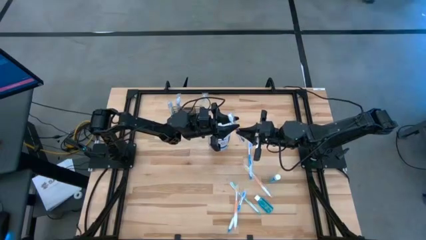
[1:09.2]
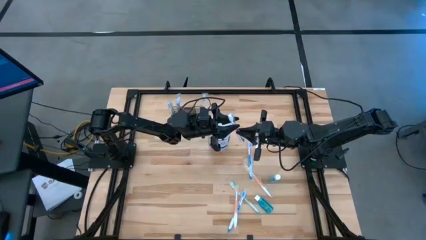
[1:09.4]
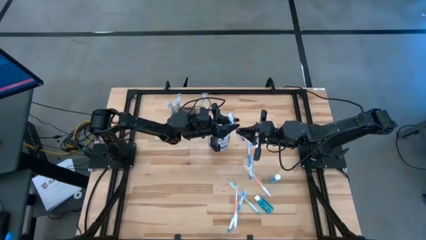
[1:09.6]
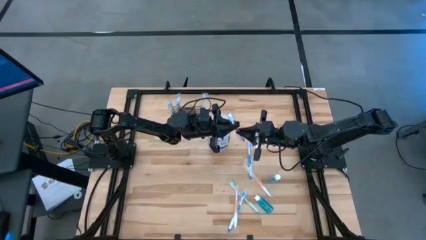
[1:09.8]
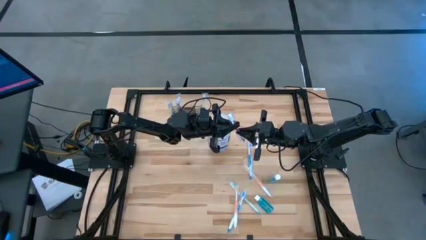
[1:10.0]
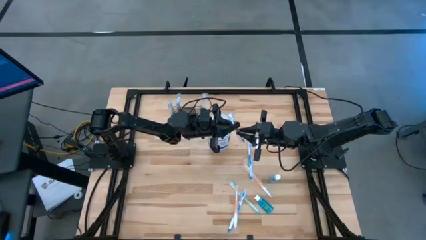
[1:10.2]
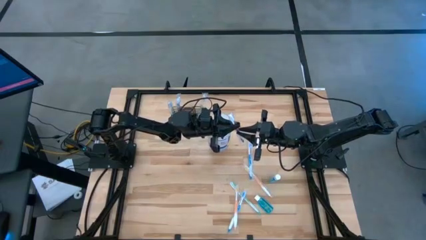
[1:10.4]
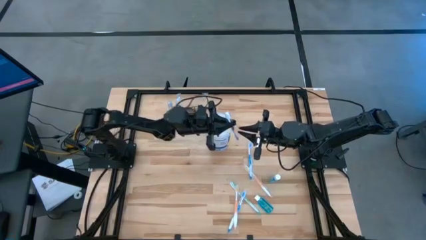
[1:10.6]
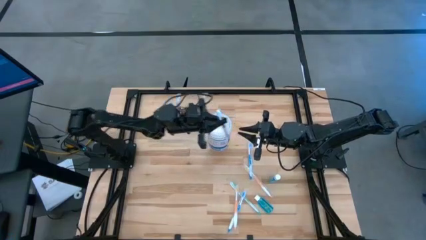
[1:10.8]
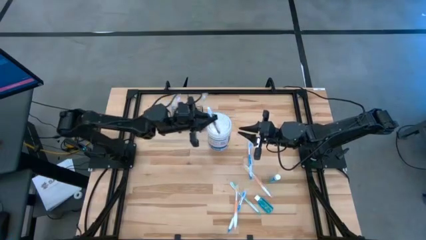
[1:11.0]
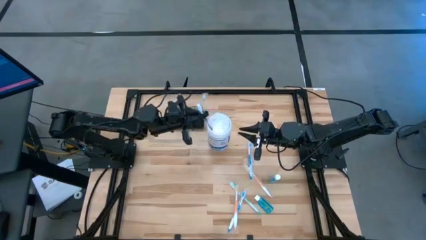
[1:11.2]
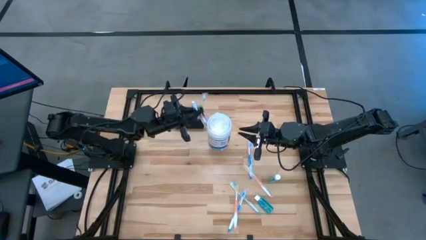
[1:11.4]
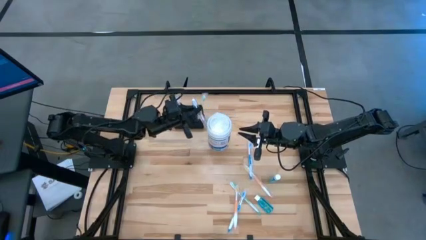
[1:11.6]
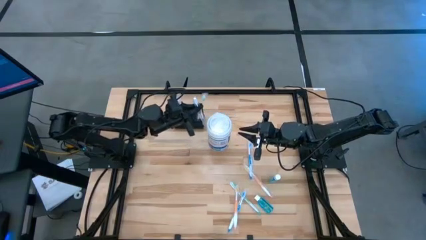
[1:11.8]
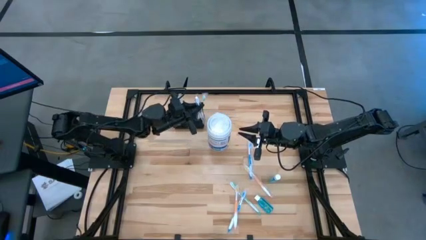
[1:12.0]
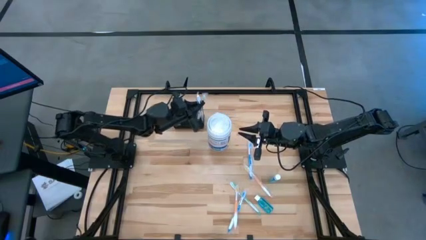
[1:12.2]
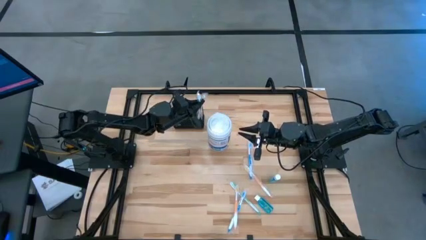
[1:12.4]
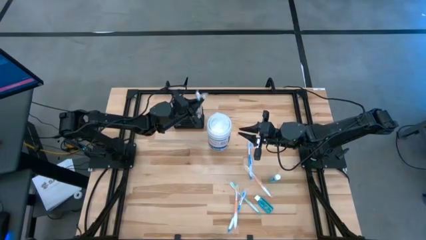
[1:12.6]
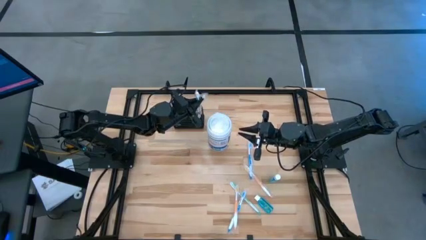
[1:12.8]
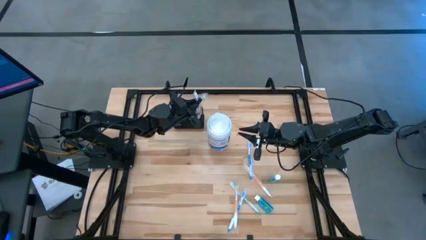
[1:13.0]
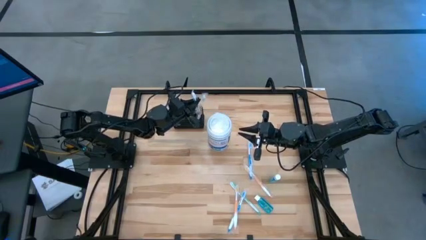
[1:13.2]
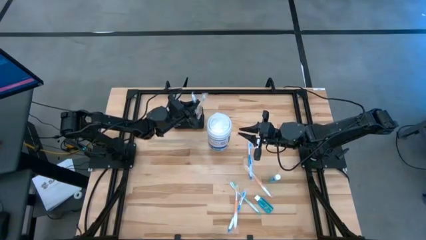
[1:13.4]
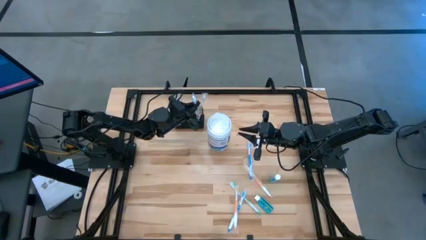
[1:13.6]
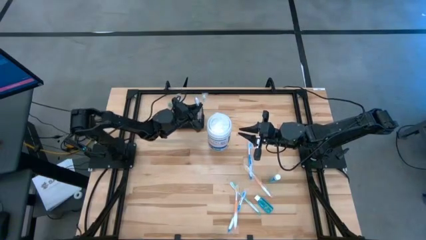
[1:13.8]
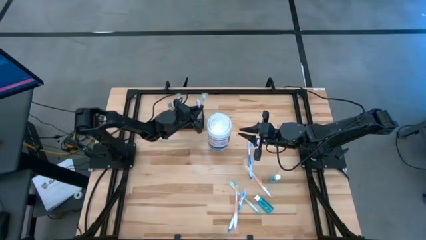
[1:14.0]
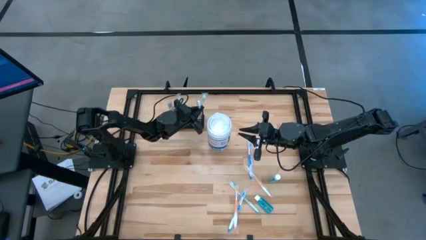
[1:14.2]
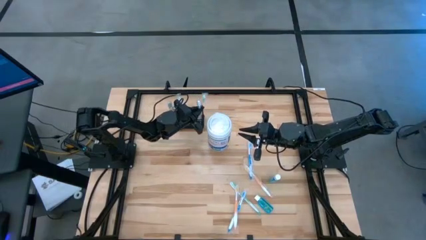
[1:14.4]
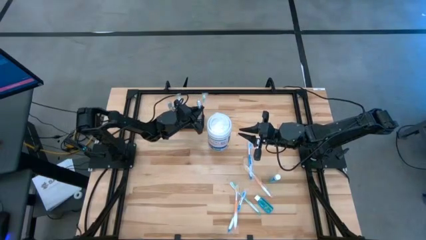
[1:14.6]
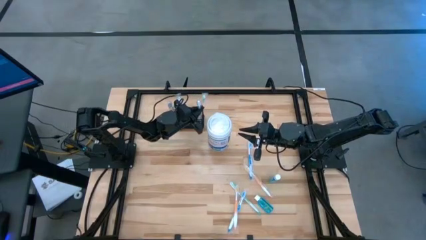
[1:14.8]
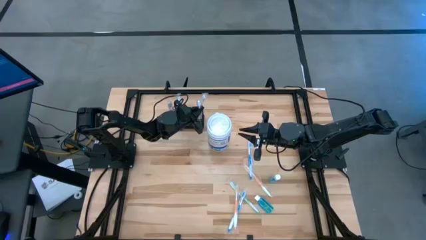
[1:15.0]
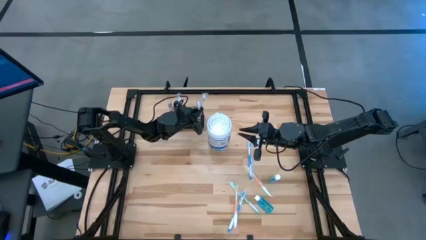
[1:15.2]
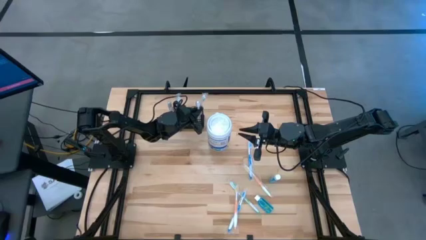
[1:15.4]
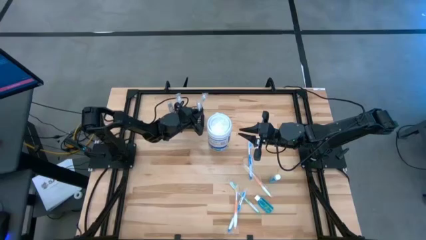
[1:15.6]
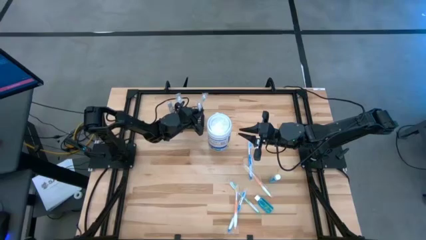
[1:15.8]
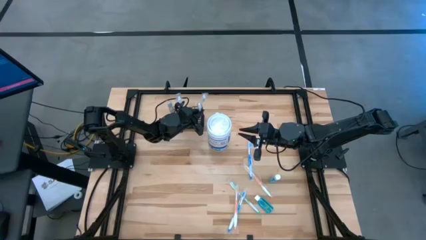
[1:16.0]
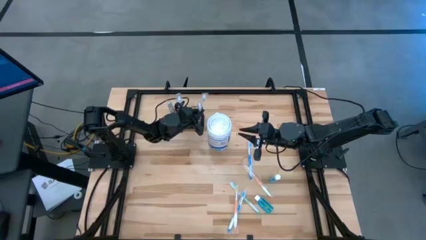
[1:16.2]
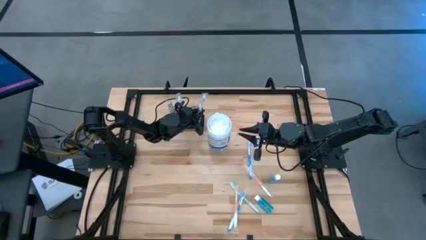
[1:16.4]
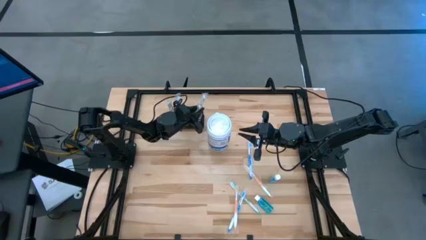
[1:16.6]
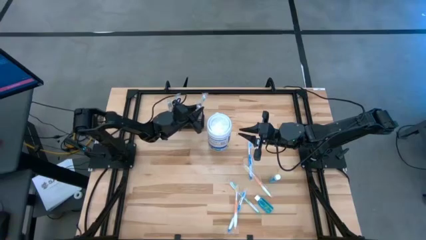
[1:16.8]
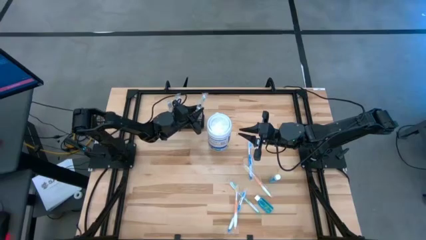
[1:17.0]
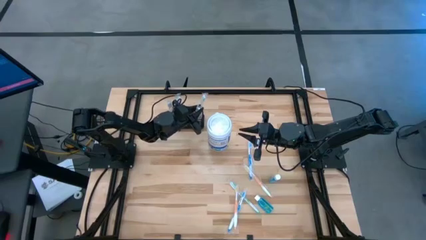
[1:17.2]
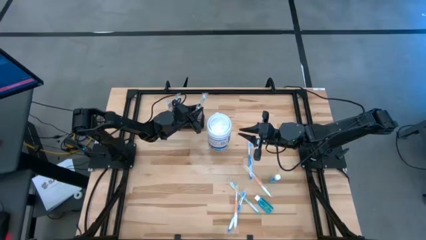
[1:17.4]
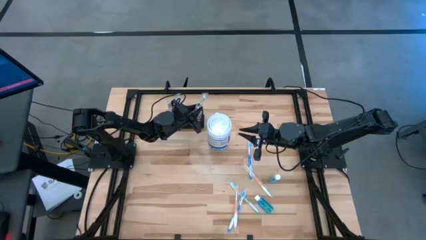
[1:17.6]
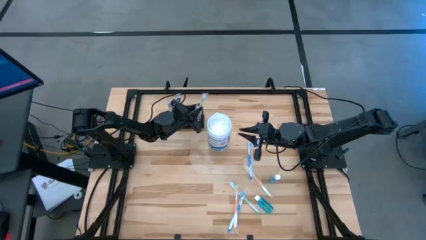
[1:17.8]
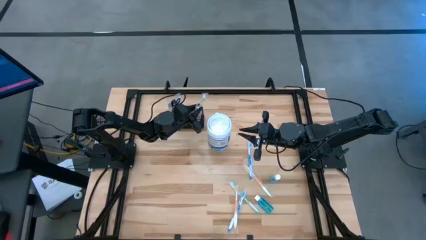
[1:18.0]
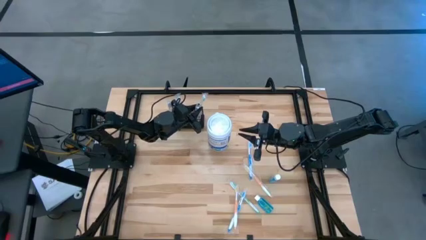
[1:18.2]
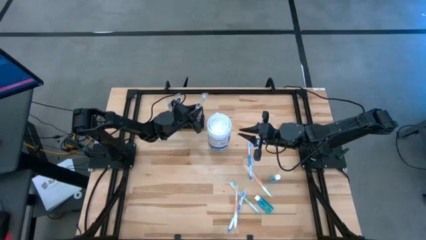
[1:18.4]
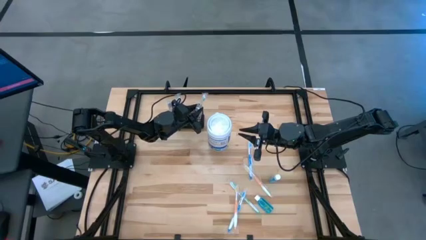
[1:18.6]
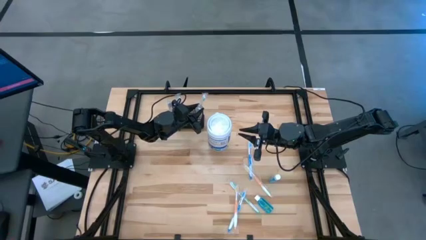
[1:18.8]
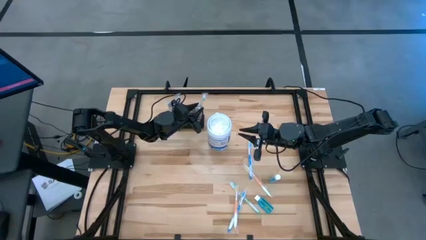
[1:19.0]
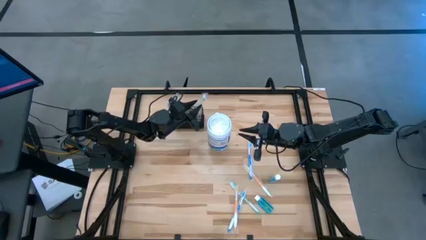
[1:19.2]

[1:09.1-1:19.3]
Task: Pick & Place toothbrushing station
Put the purple toothbrush into the mesh organizer

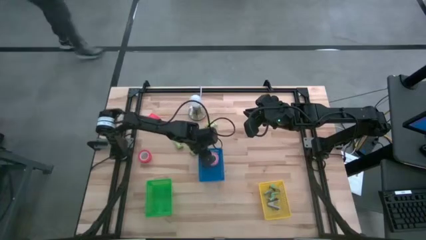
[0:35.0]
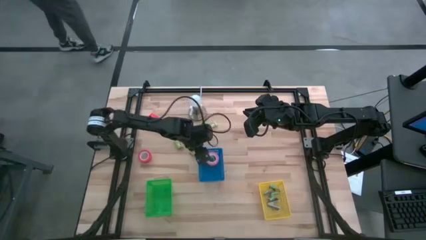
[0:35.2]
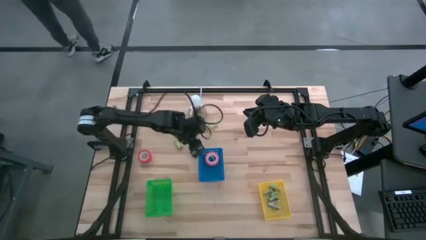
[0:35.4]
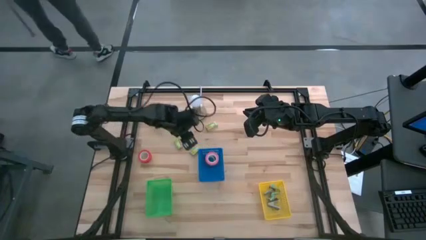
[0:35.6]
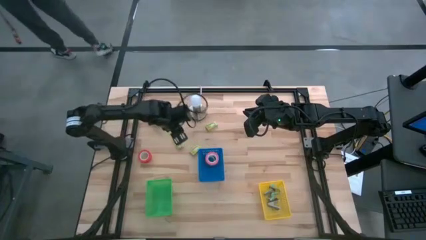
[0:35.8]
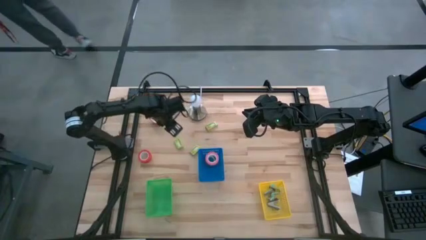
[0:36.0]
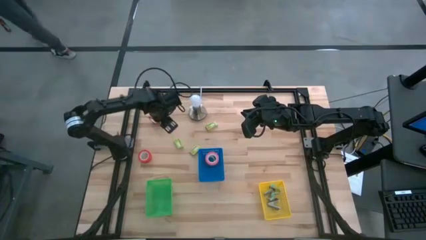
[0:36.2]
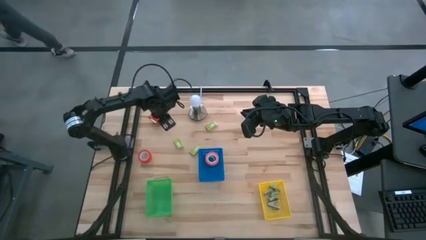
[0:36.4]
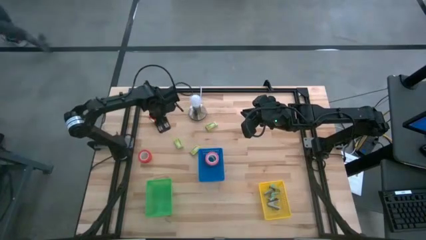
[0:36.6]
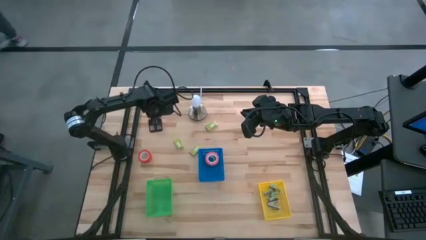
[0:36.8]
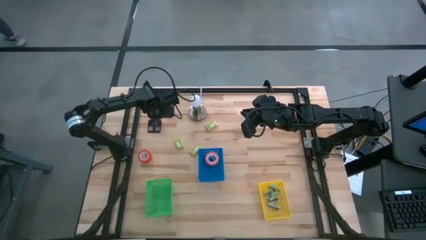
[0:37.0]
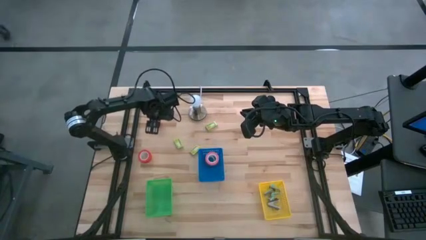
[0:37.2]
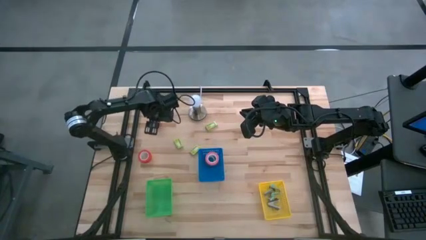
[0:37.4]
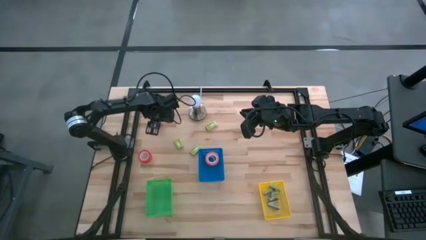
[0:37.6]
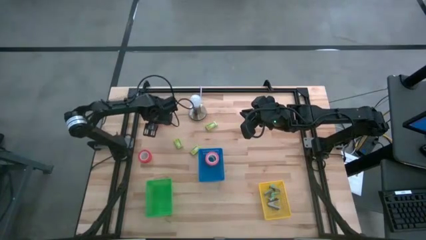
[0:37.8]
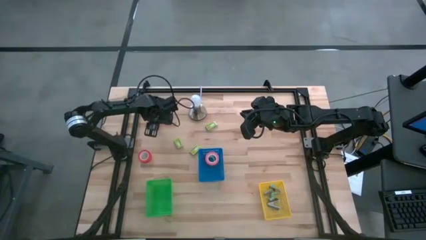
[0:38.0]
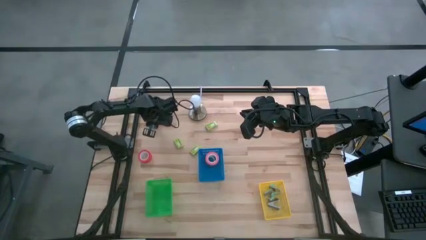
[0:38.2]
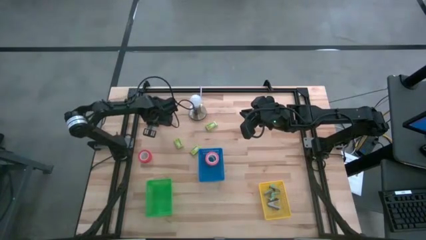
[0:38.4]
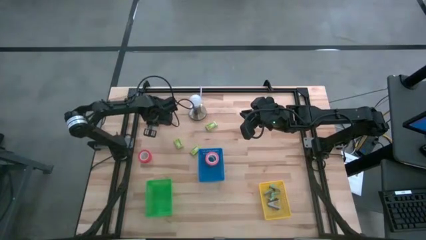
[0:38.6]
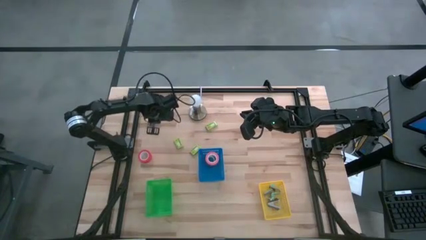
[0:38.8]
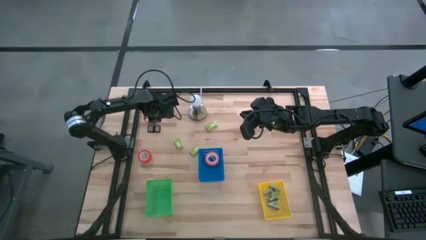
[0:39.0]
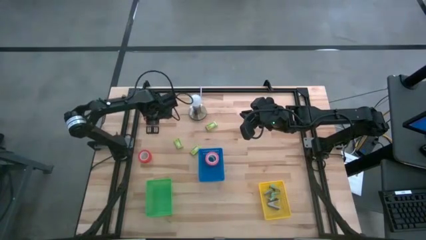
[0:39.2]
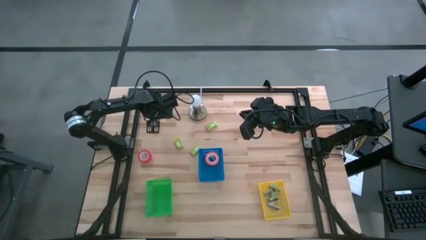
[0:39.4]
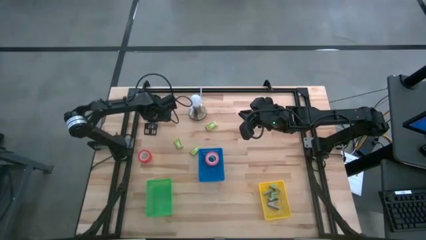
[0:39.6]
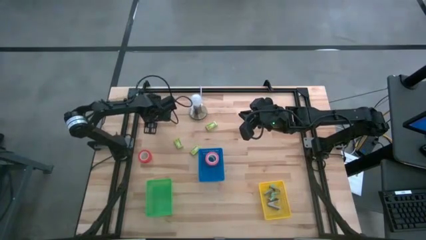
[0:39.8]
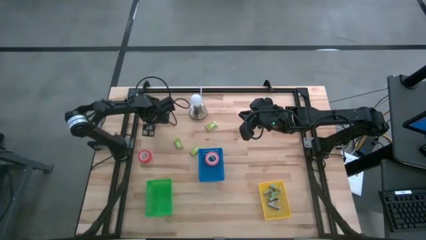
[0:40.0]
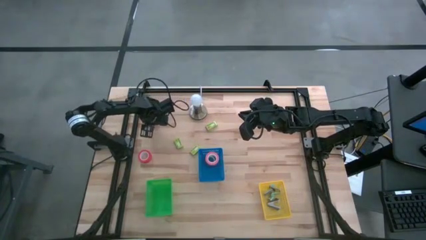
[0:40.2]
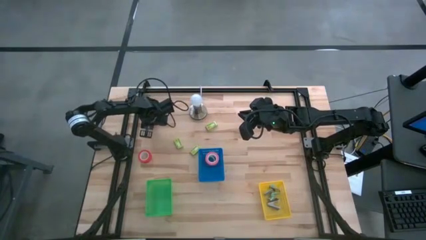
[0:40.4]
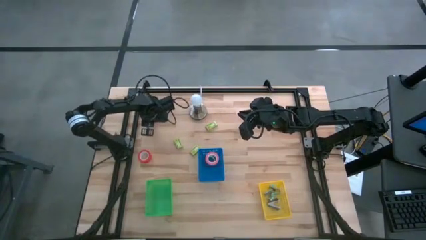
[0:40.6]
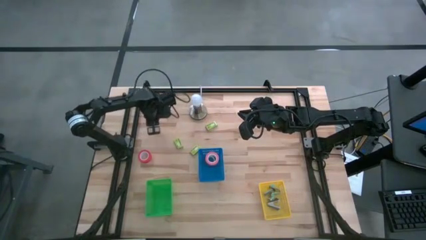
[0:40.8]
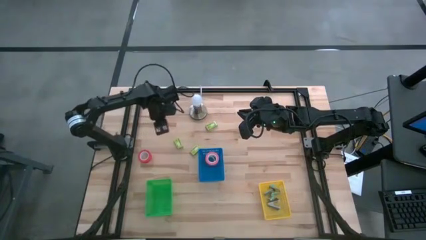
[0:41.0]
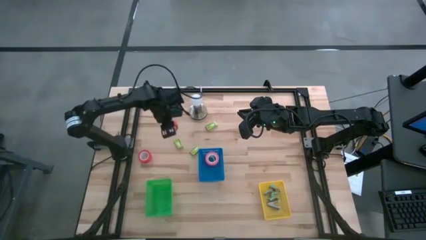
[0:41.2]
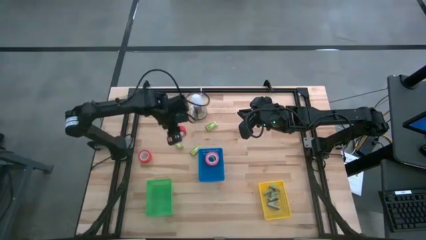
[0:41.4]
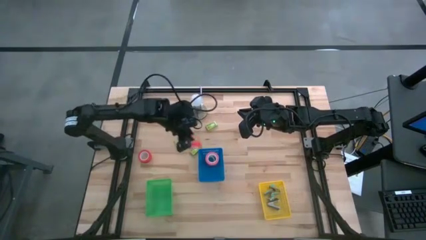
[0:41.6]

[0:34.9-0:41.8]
Task: Pick and place Stapler, Stapler remover, tape
Put the top orange tape into the blue bin
